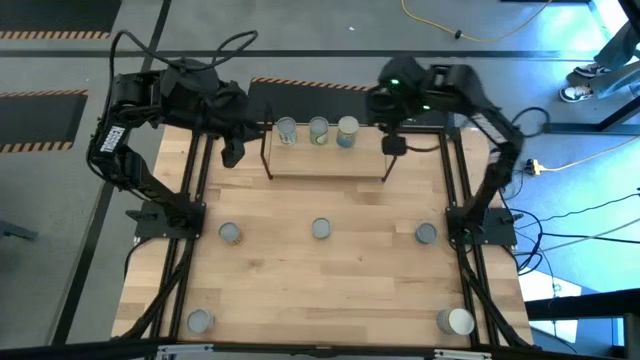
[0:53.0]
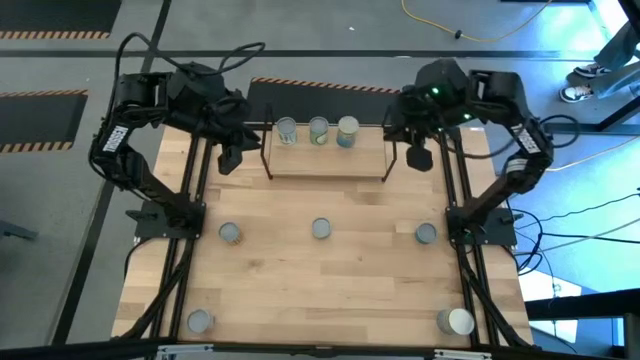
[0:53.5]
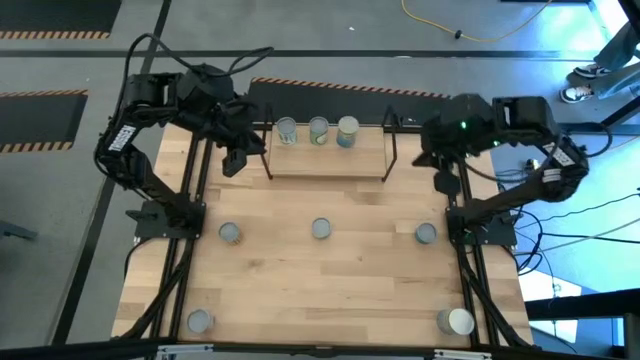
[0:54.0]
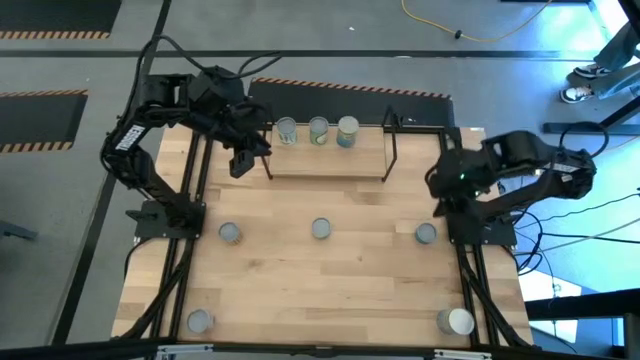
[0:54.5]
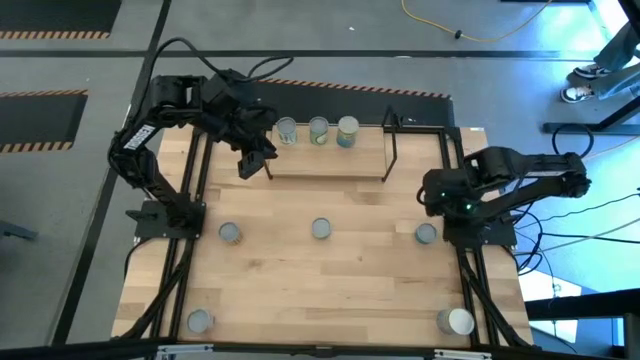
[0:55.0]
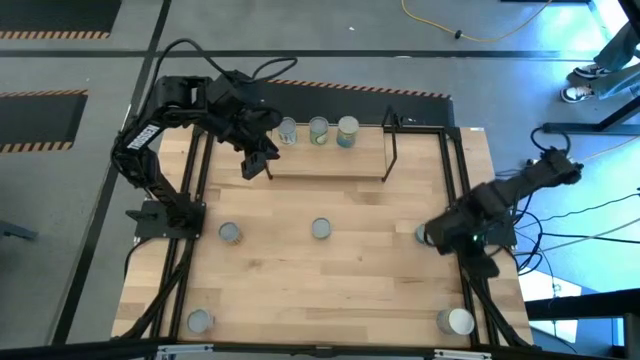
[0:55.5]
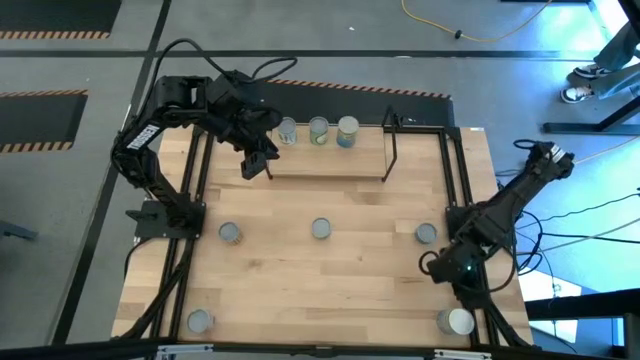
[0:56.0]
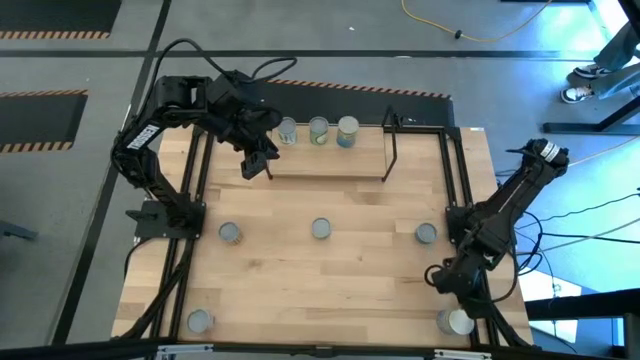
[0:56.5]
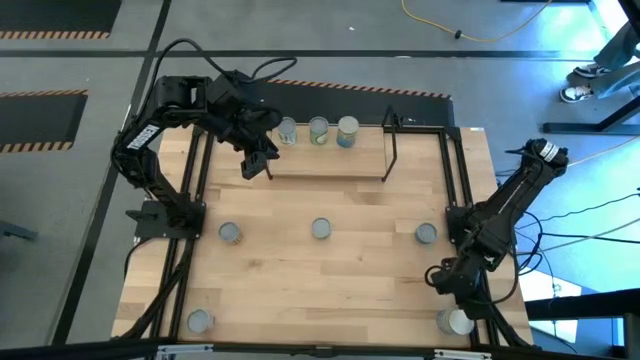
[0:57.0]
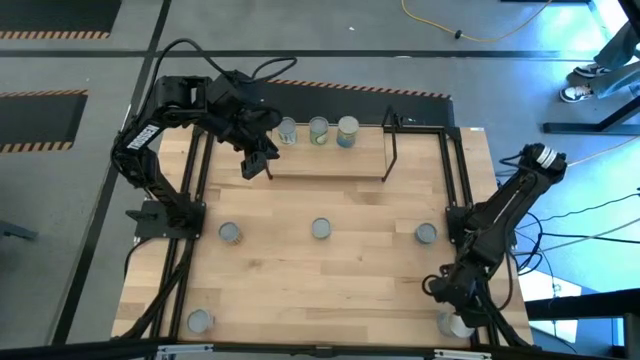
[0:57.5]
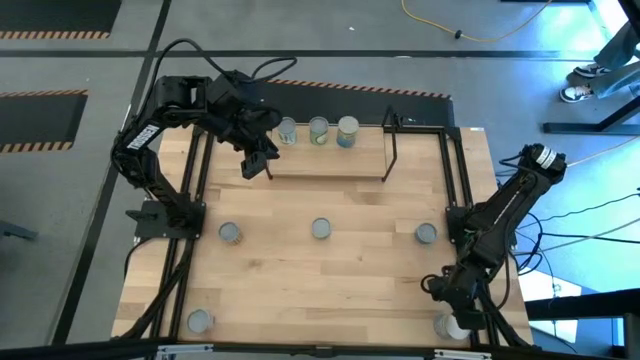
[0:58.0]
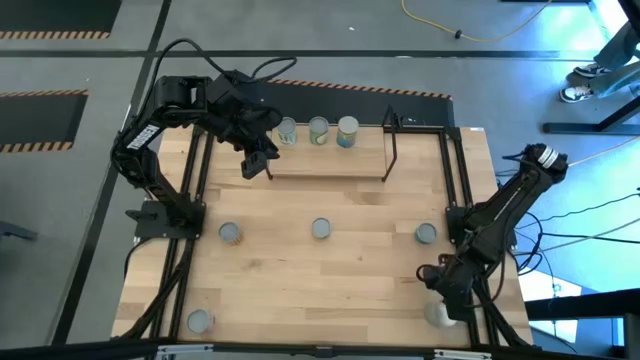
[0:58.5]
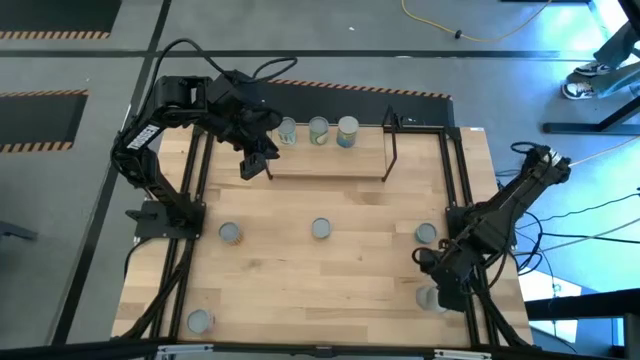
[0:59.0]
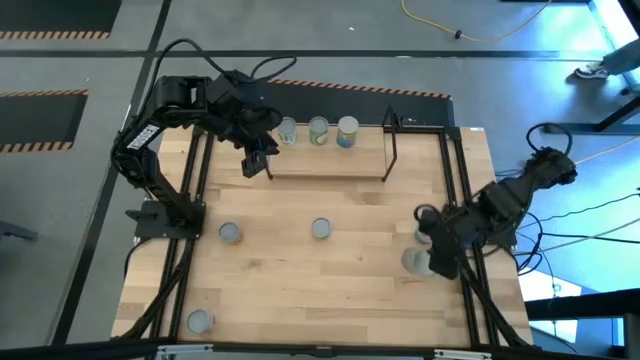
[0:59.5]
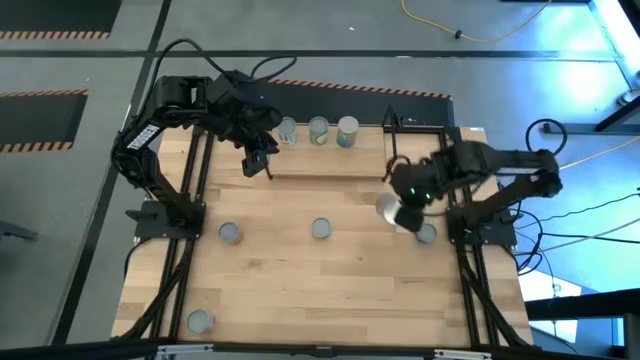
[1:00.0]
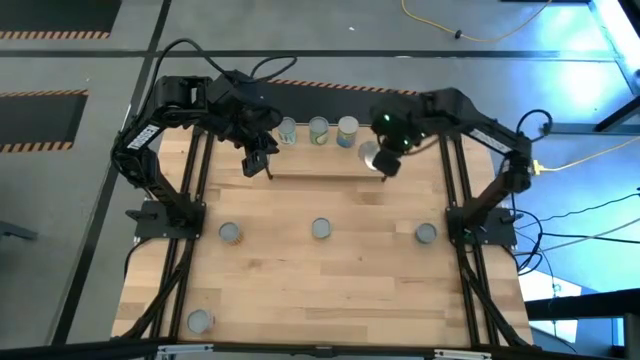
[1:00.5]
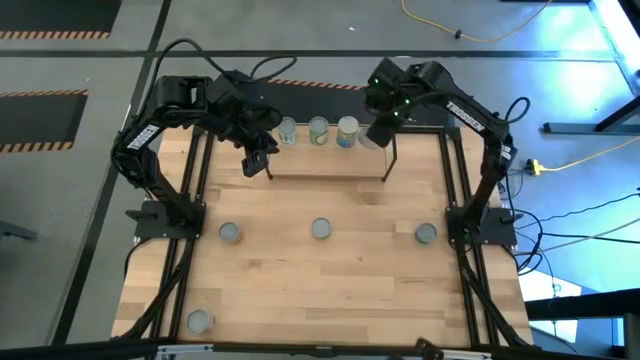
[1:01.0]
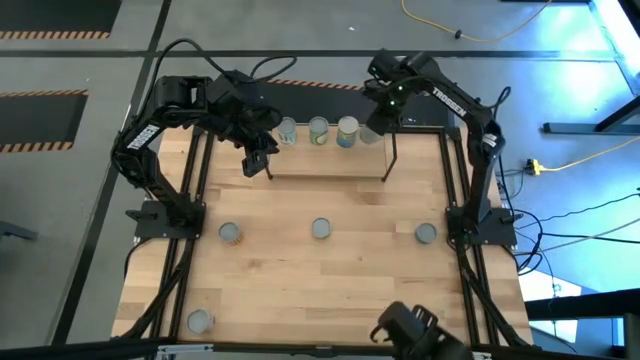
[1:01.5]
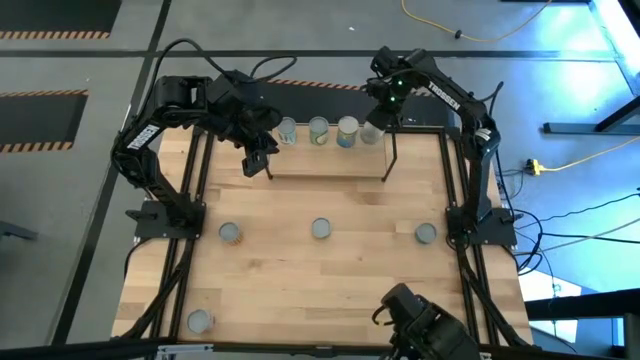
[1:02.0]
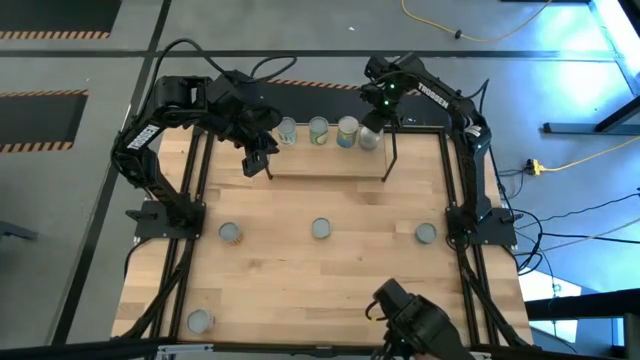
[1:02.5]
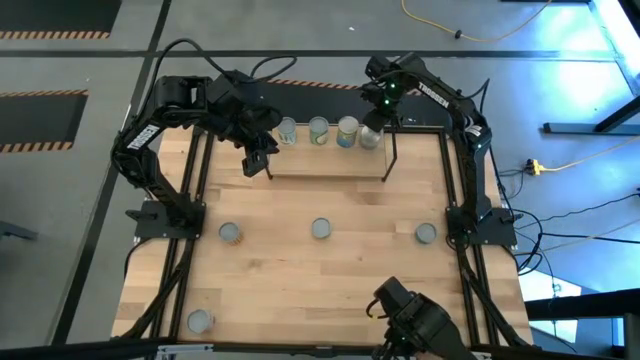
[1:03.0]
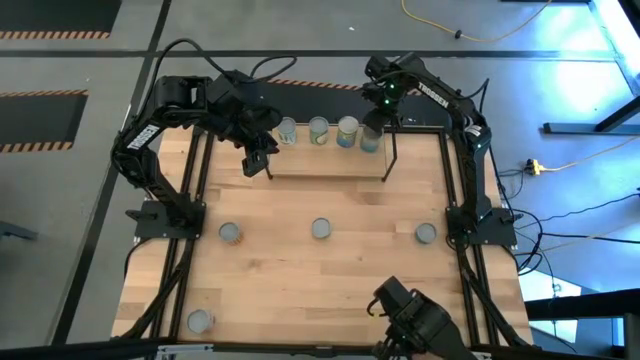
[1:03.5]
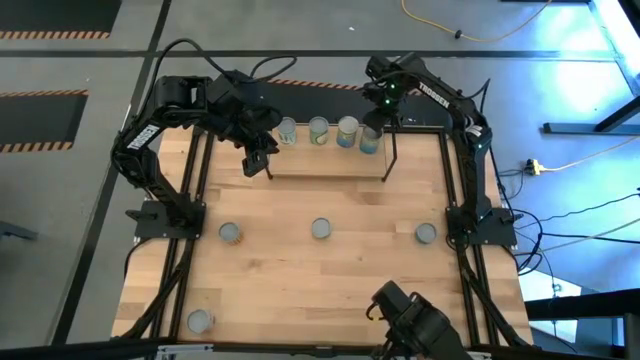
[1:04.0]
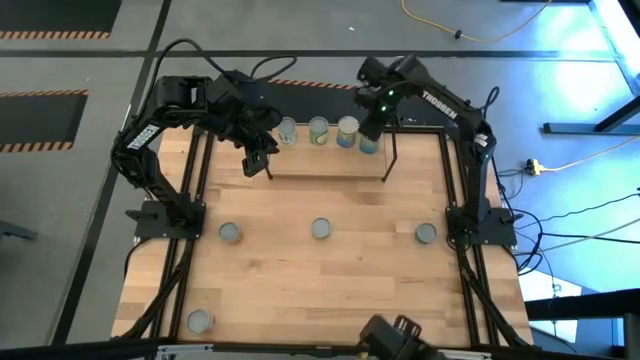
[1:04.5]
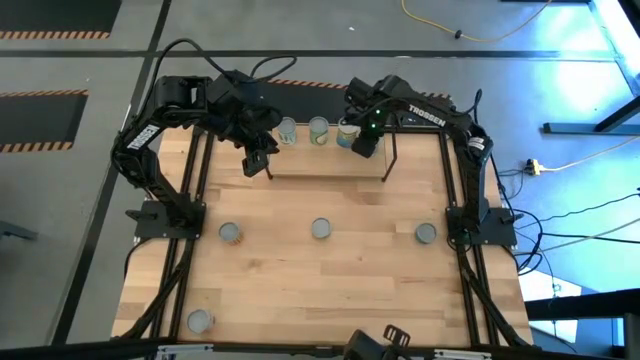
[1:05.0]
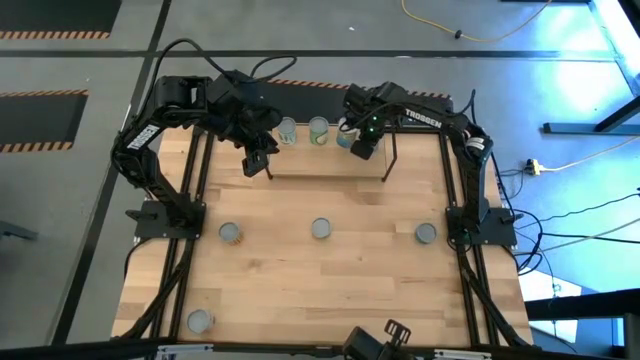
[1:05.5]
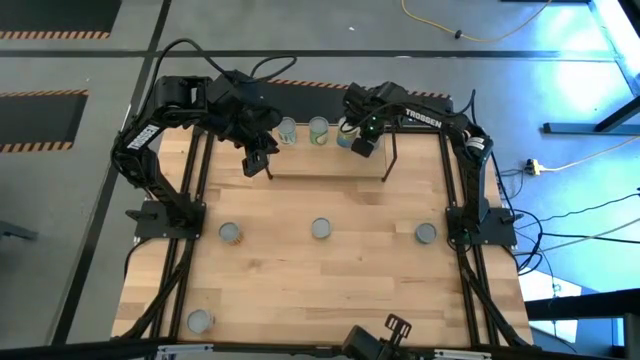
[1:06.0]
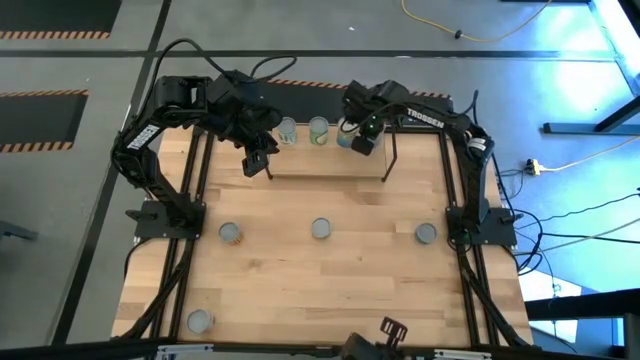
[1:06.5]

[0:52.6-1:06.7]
Task: Pick and place cans onto a shelf
Put the light blue can on the shelf aligned with the other light blue can

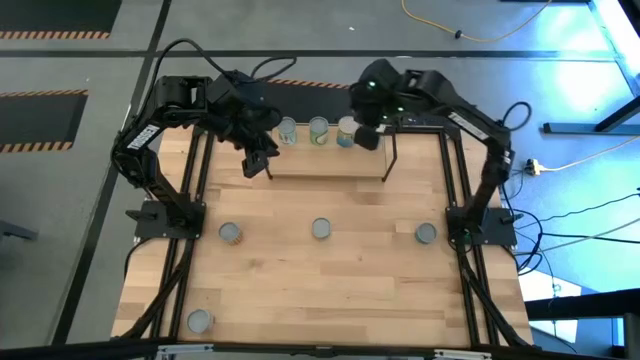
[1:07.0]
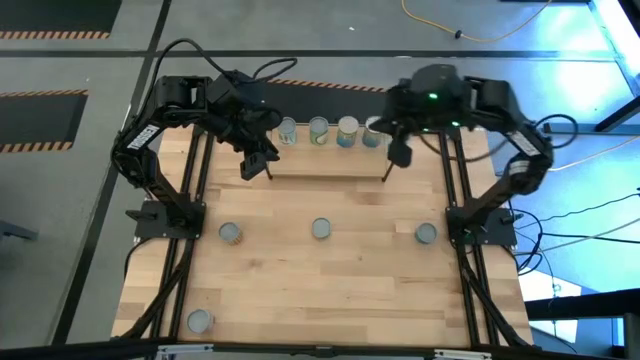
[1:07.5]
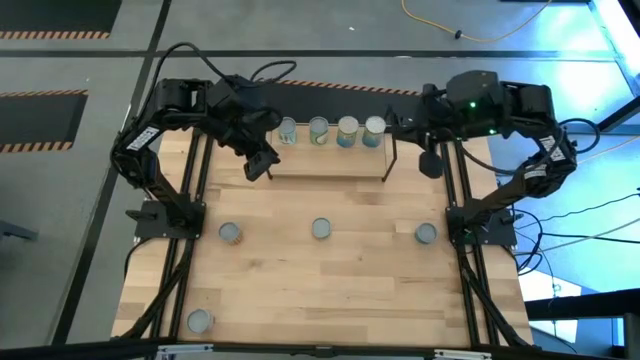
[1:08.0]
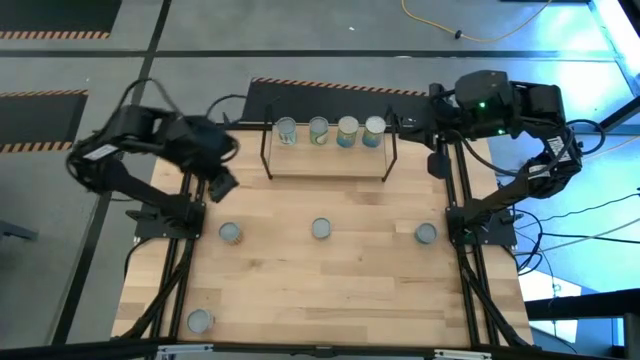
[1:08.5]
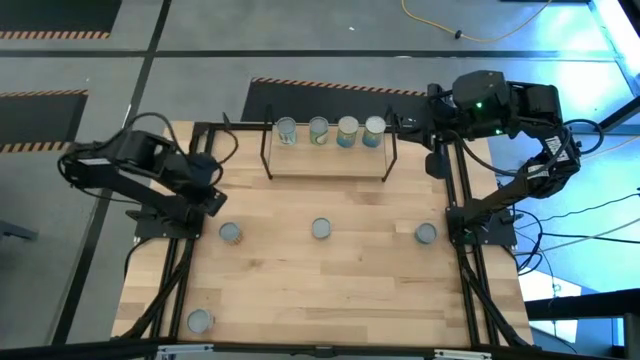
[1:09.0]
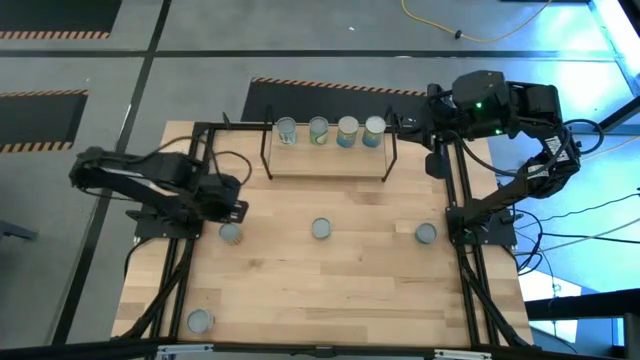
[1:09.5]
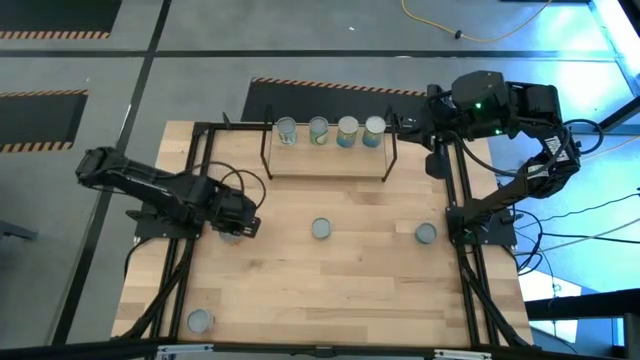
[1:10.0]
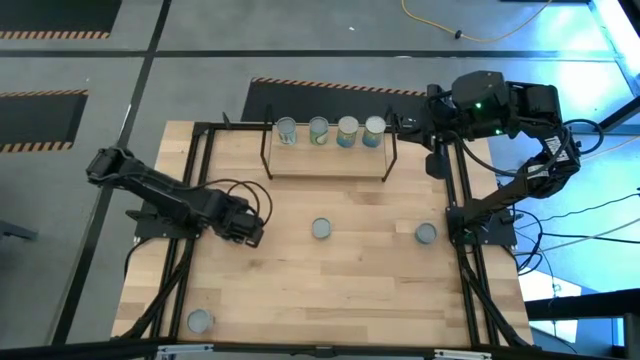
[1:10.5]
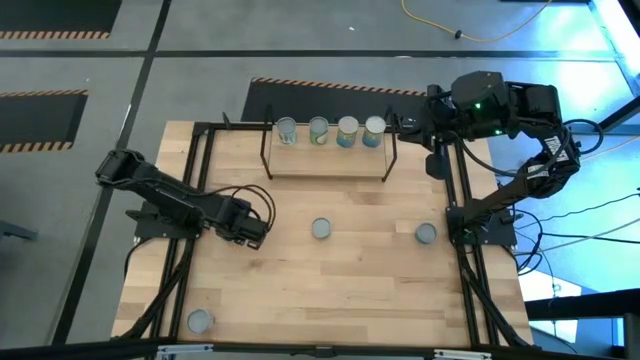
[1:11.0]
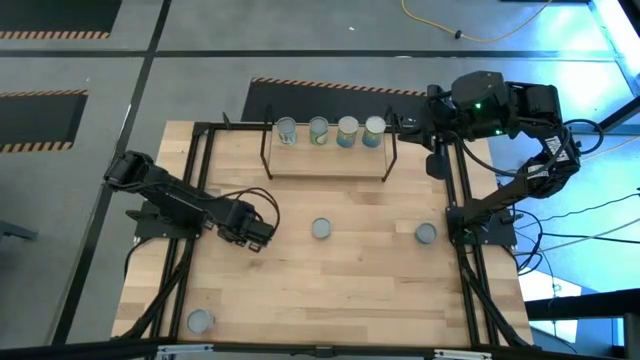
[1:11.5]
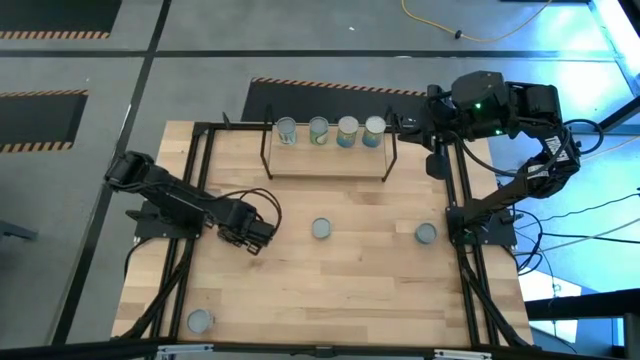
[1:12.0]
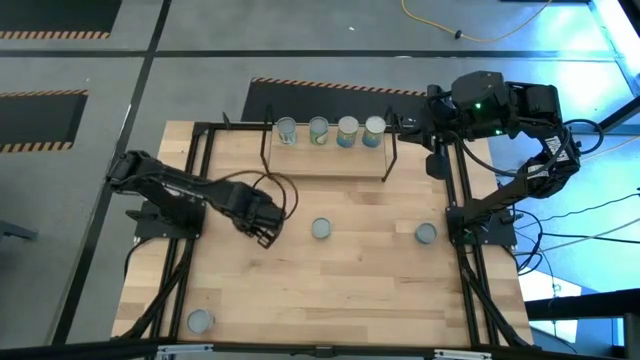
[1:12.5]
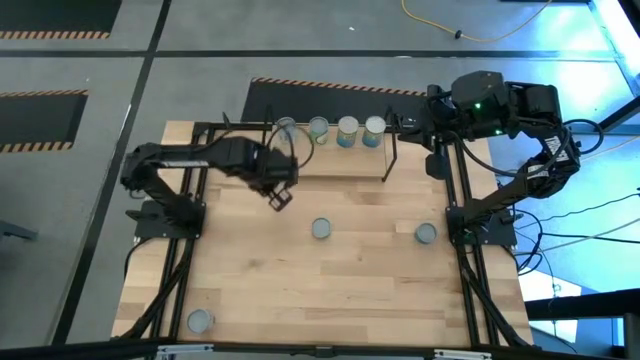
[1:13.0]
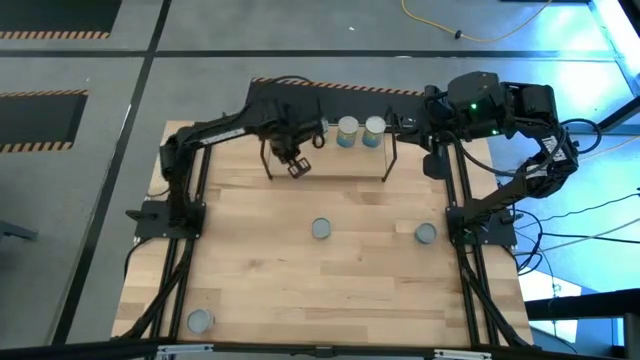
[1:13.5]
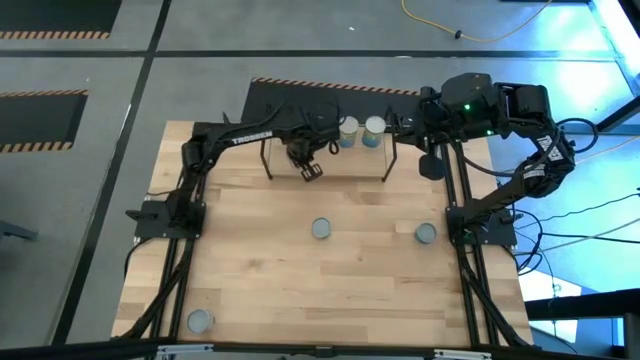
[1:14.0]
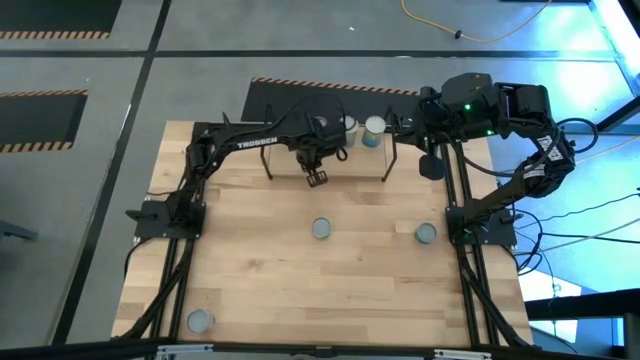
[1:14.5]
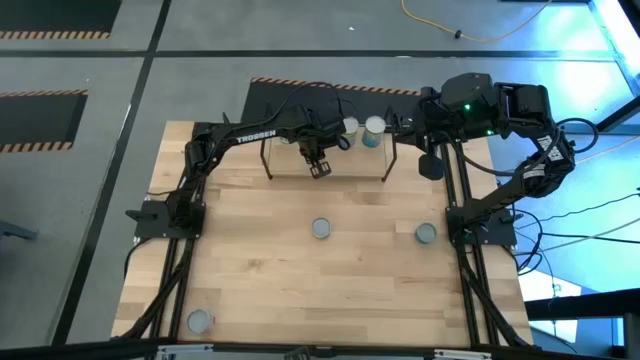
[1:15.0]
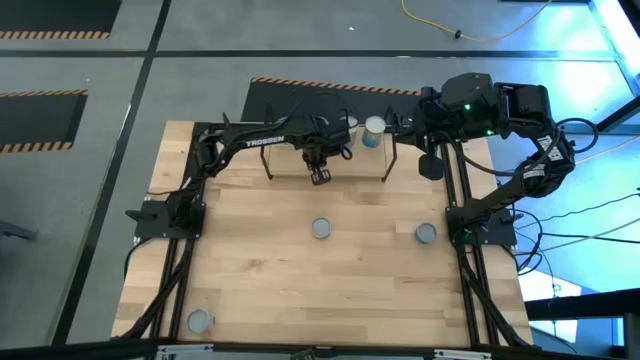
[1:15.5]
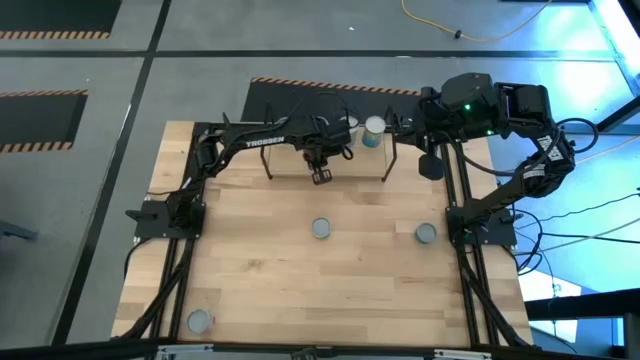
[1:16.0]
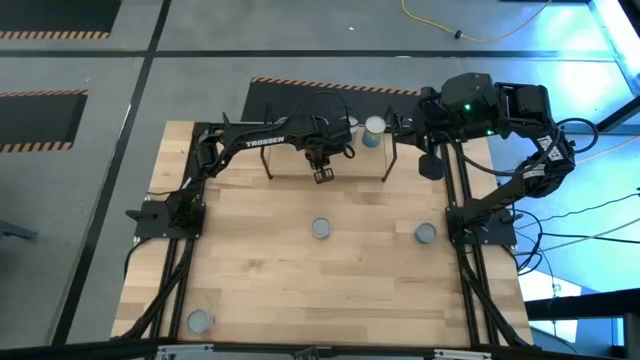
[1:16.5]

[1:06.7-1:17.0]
Put the yellow can on the shelf aligned with the pink can
